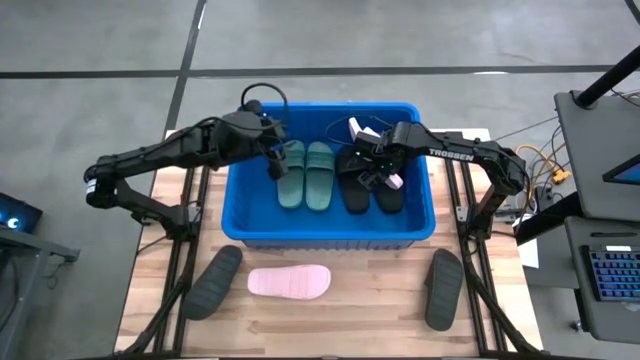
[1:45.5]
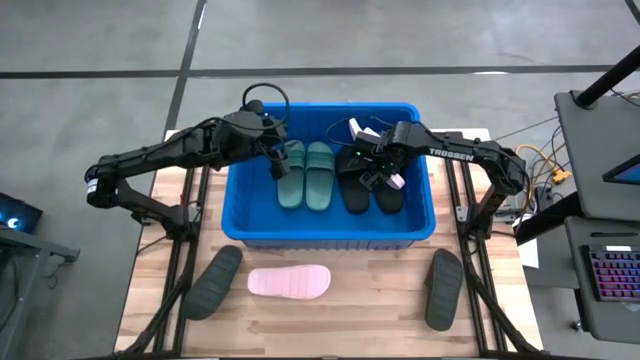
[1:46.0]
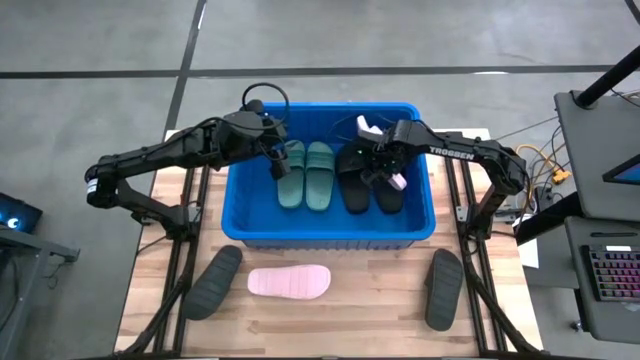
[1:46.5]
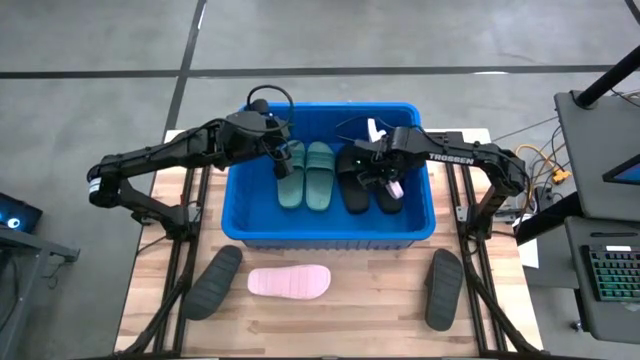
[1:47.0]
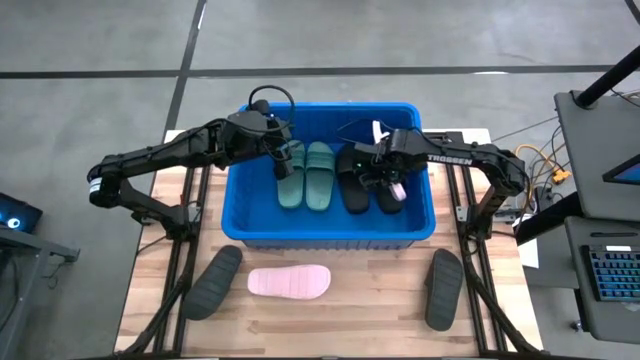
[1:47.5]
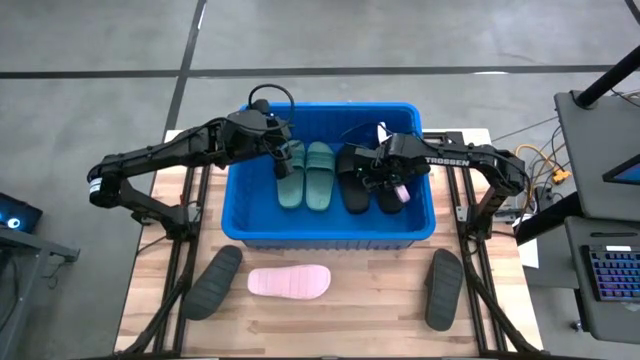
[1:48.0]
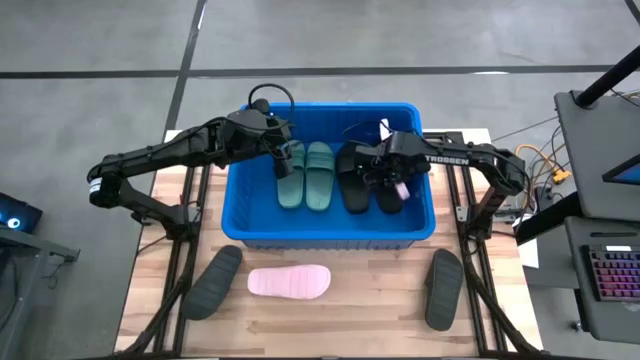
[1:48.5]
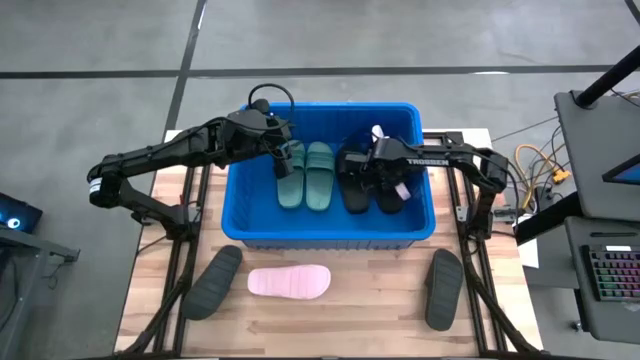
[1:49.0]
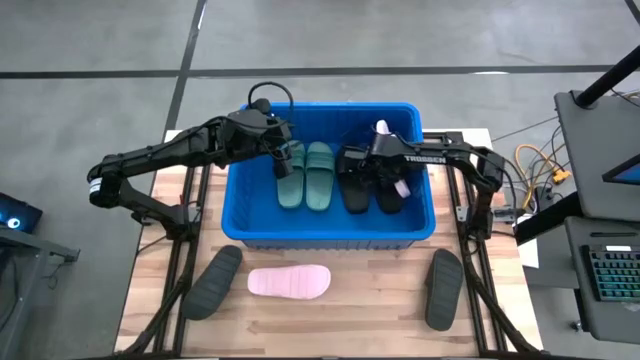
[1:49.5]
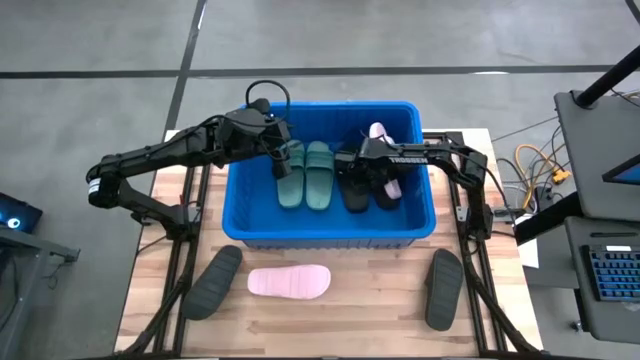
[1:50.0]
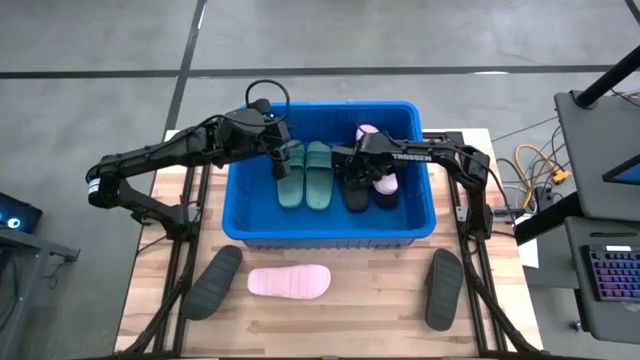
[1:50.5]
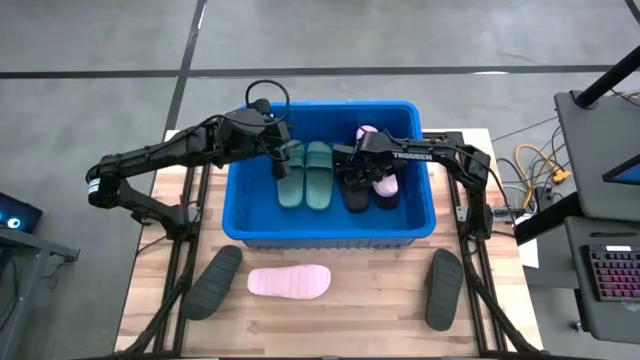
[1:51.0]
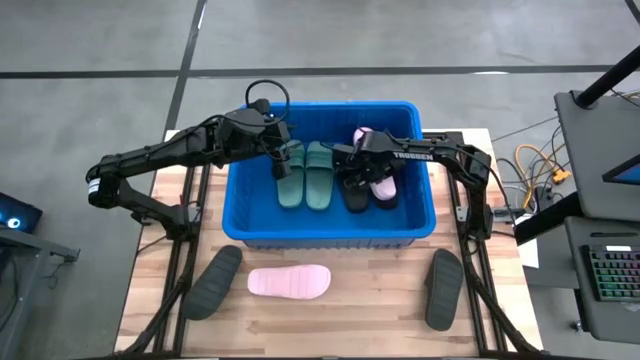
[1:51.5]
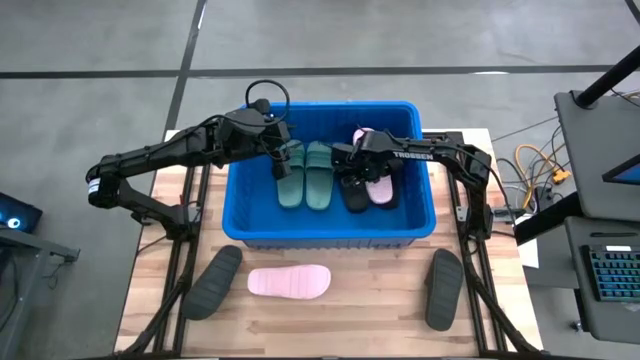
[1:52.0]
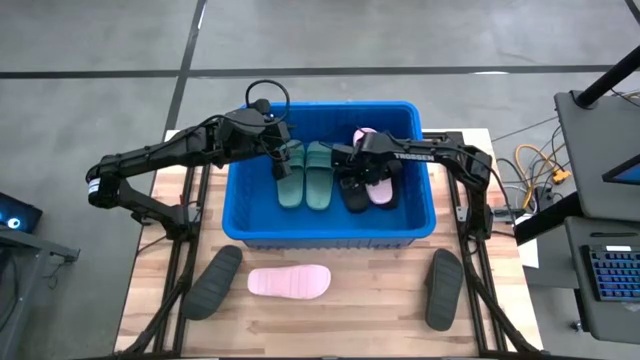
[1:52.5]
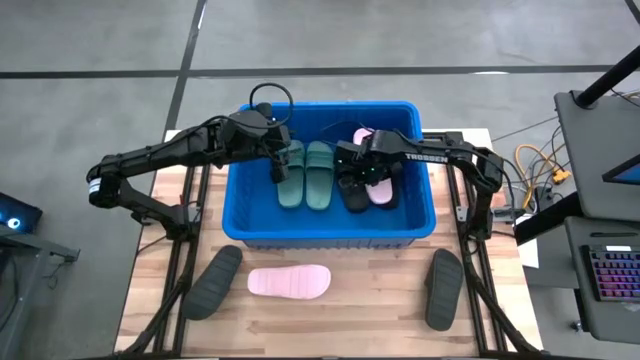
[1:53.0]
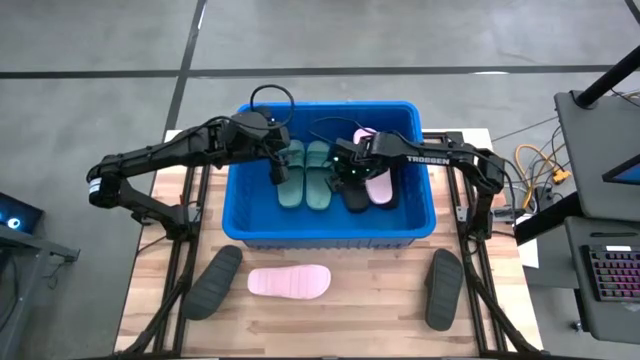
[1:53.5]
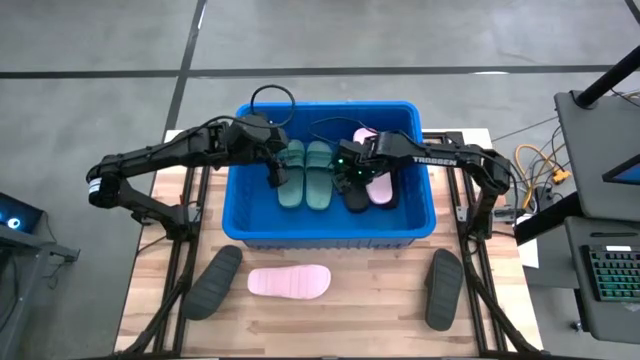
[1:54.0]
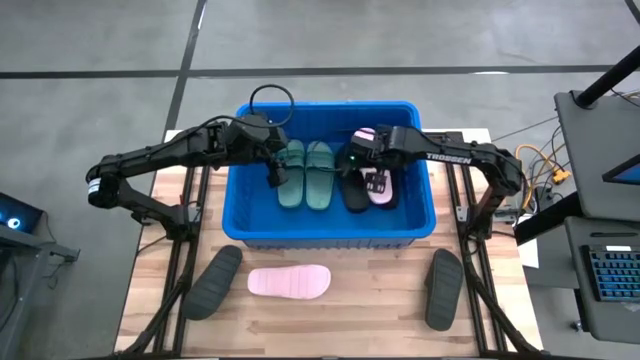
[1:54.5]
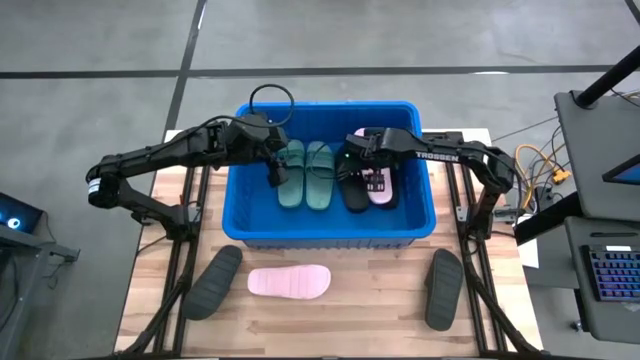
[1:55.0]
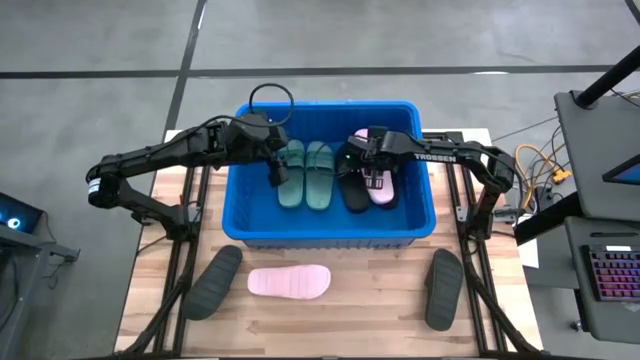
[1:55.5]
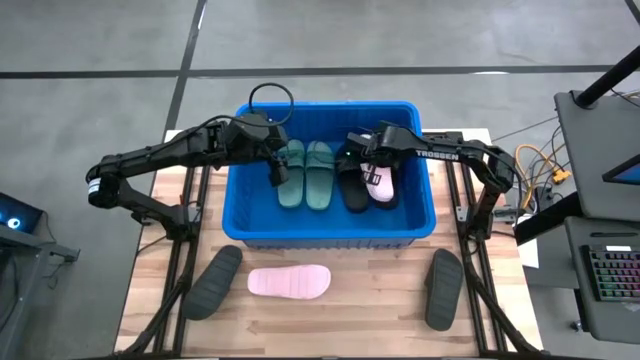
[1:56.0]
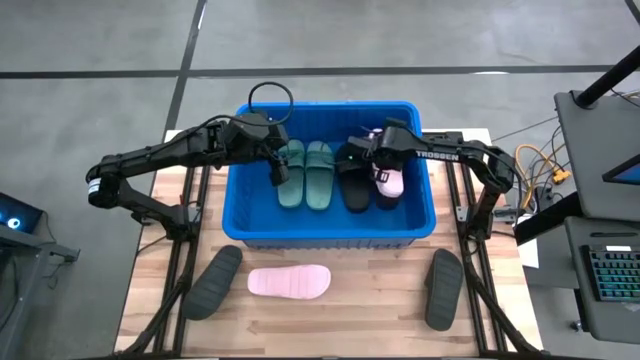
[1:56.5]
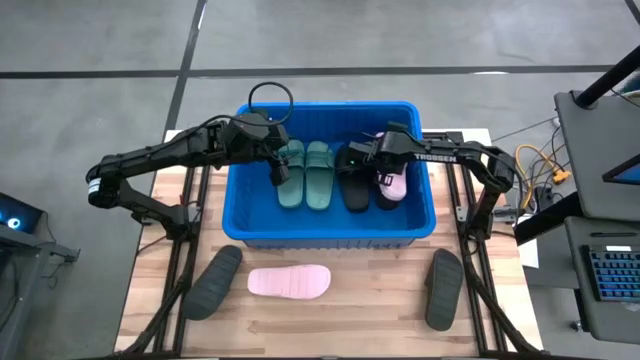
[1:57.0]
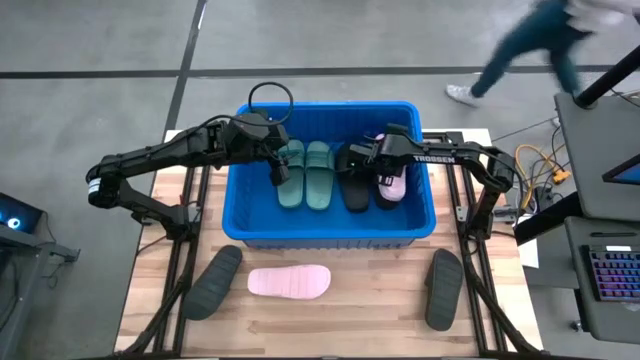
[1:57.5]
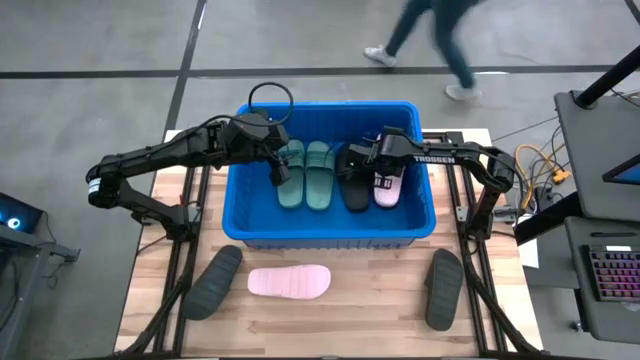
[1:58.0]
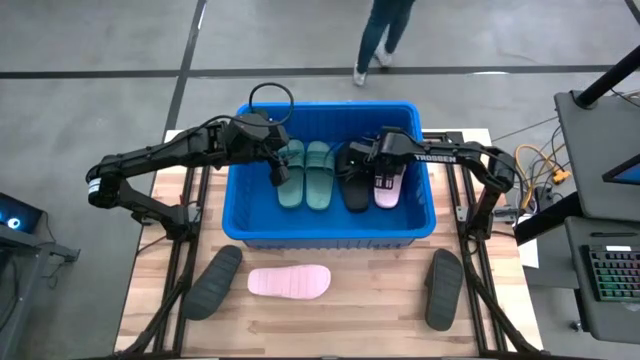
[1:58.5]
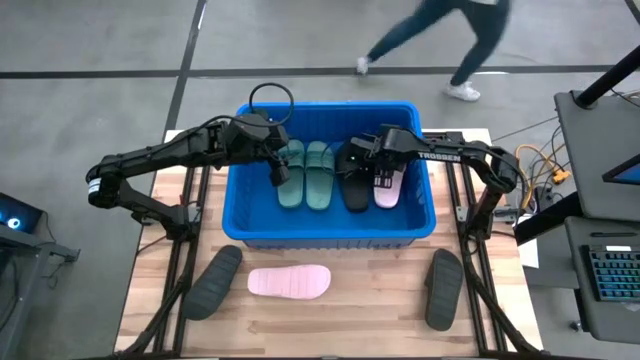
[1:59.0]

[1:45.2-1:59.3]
Task: Pick and place slides into bin
Put the right pink slide into the bin

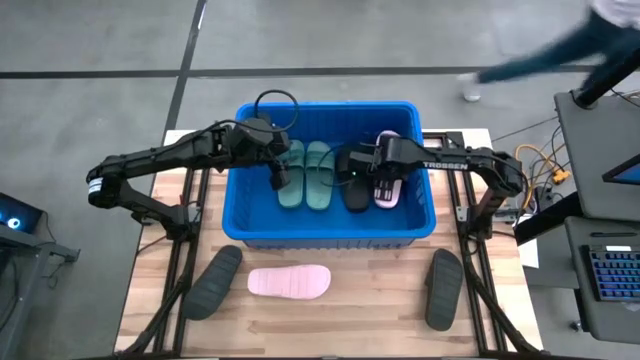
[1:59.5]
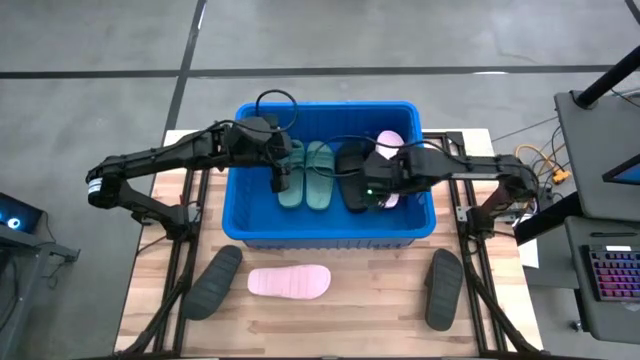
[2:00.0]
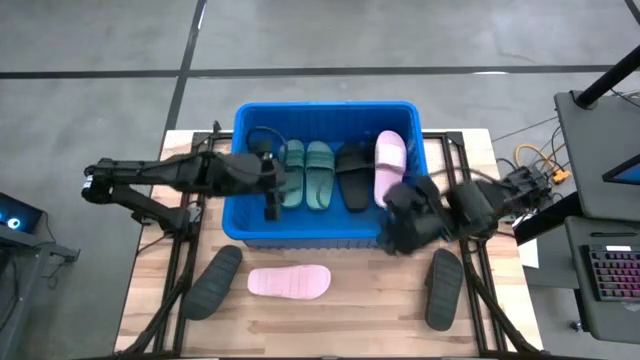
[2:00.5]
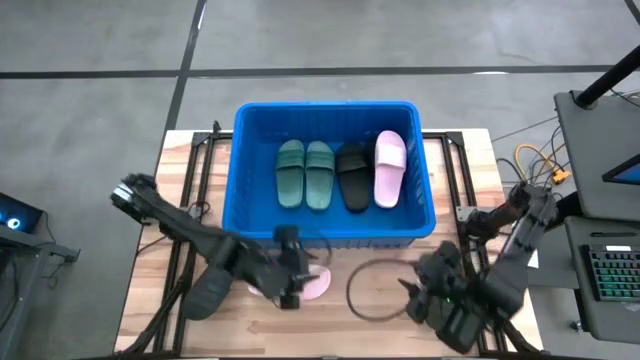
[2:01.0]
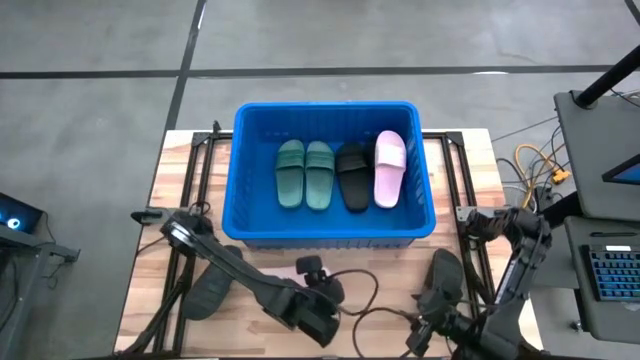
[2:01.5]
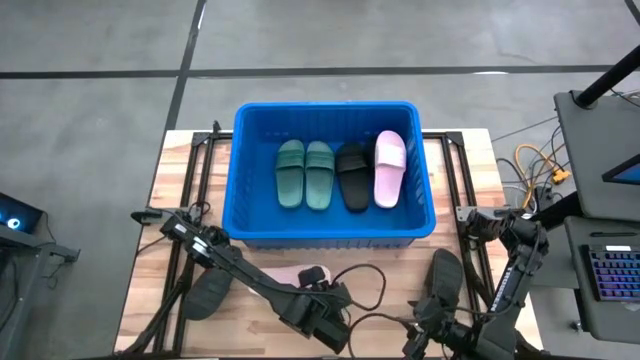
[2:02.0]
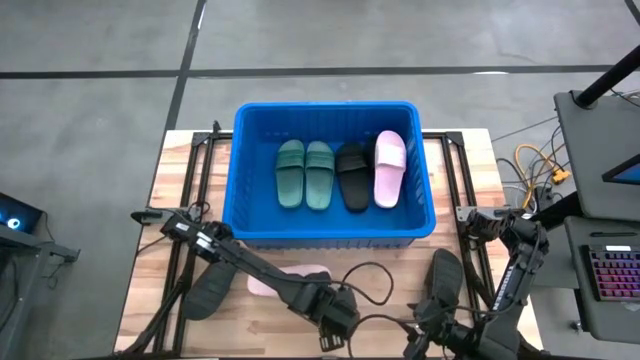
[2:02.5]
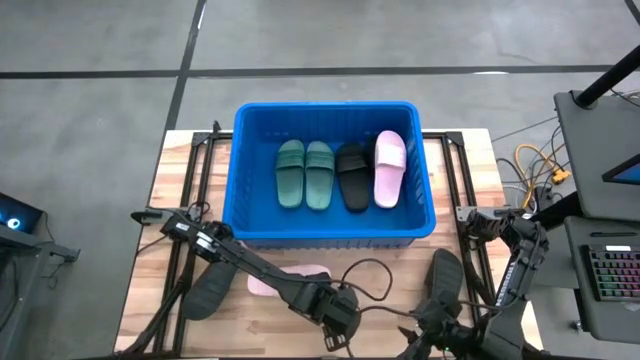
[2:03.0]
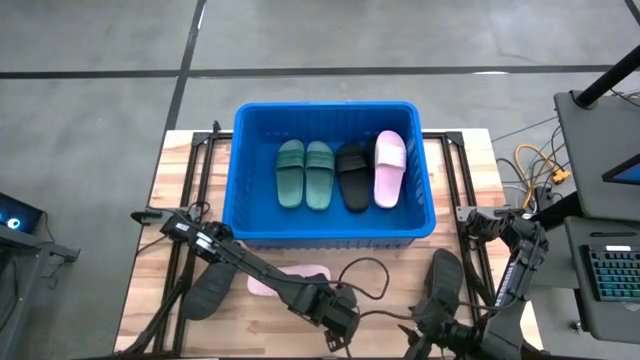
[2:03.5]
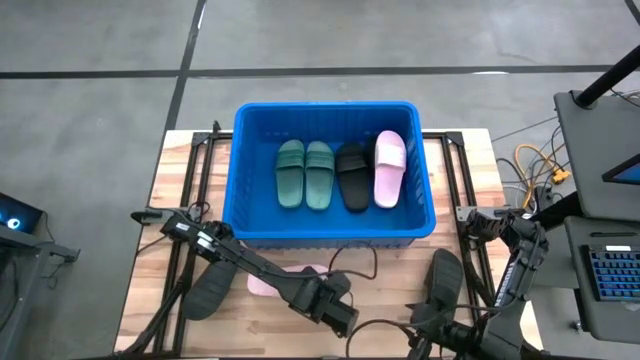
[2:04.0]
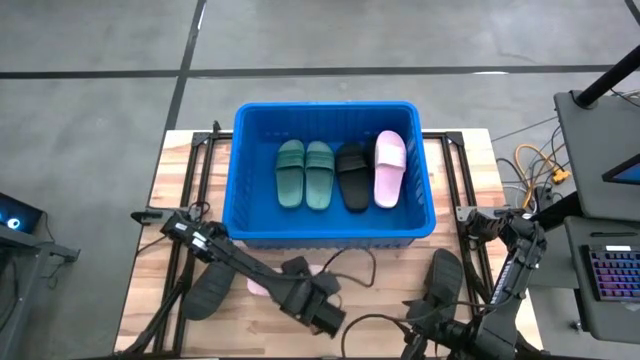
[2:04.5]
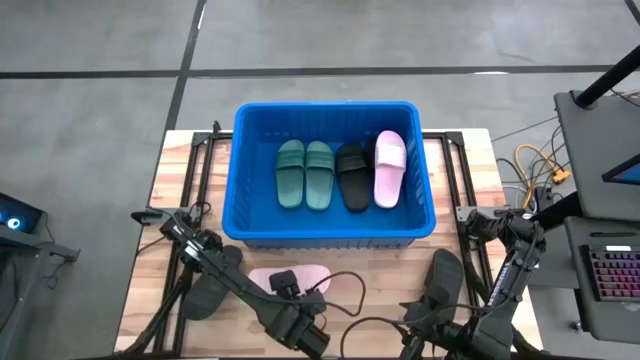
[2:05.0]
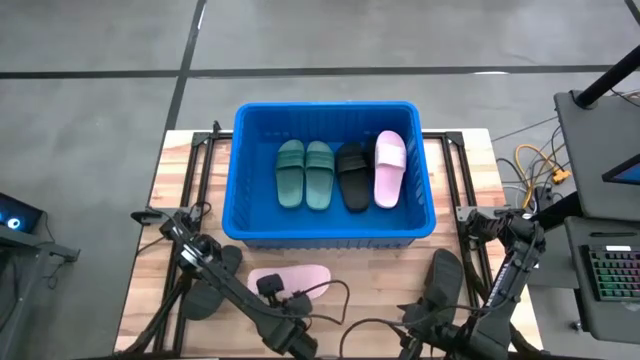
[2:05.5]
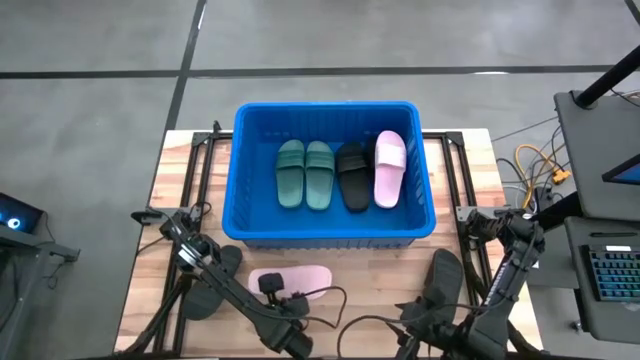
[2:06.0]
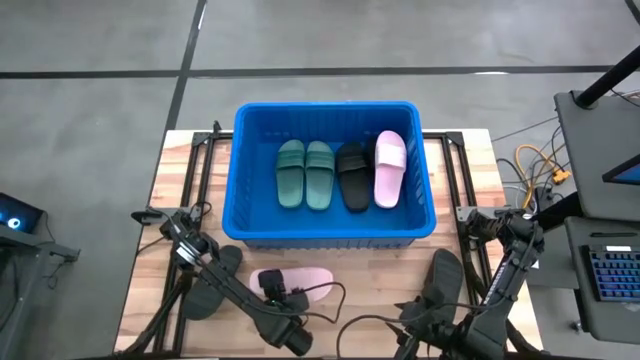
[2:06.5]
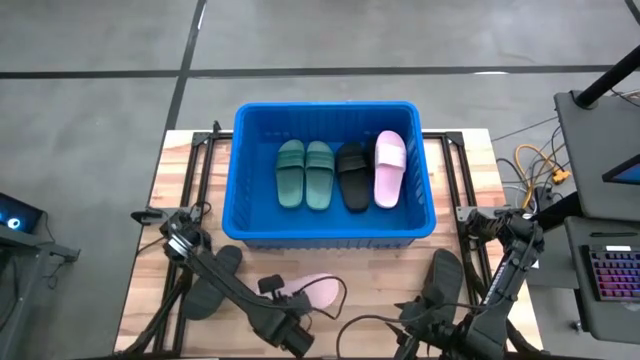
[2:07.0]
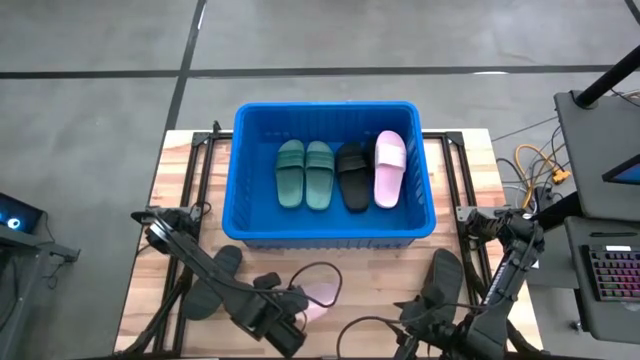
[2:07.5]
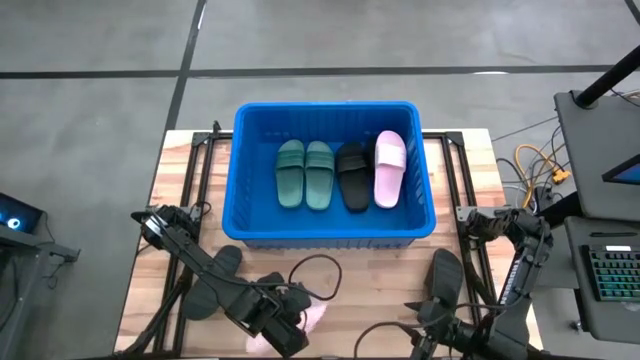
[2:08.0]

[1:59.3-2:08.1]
Put the pink slide into the bin
